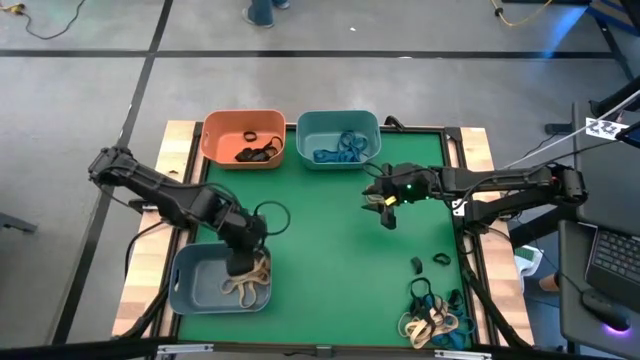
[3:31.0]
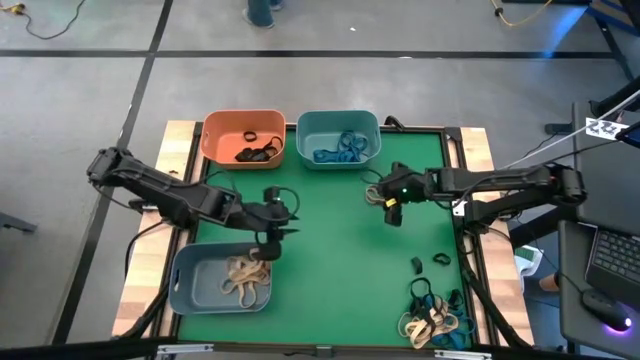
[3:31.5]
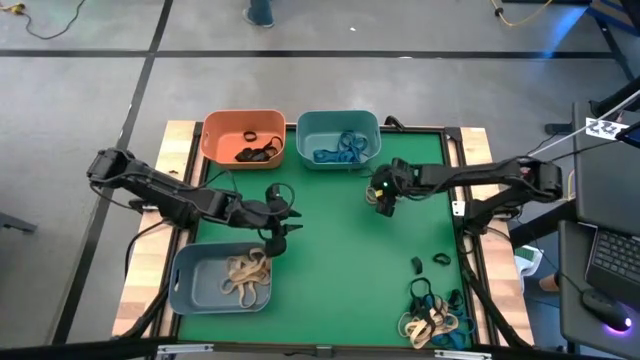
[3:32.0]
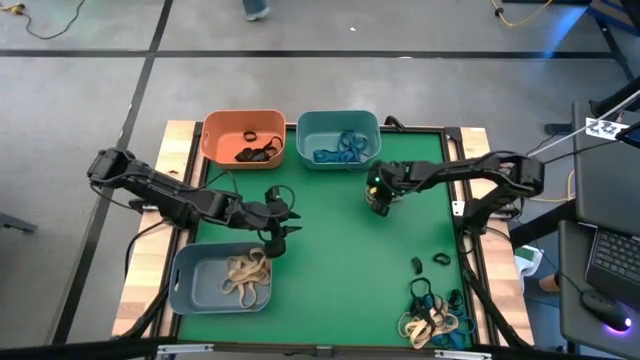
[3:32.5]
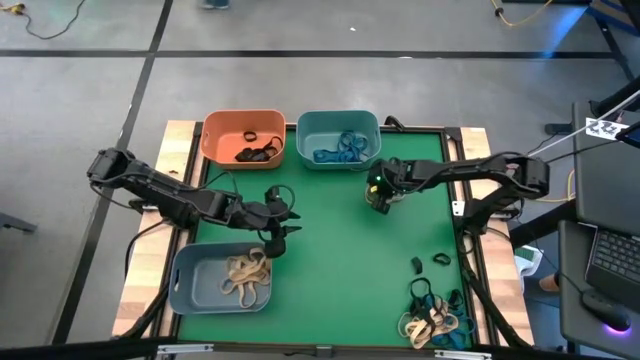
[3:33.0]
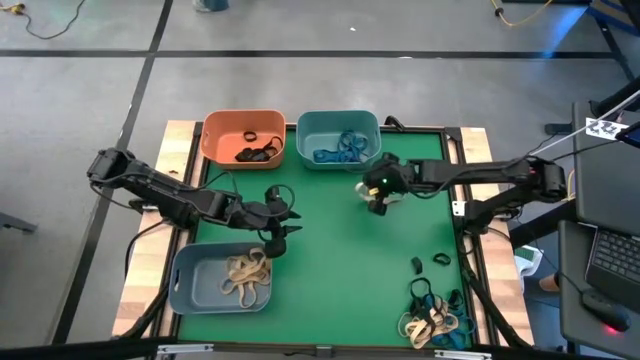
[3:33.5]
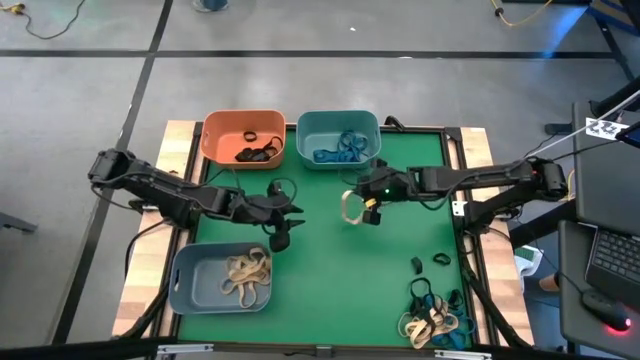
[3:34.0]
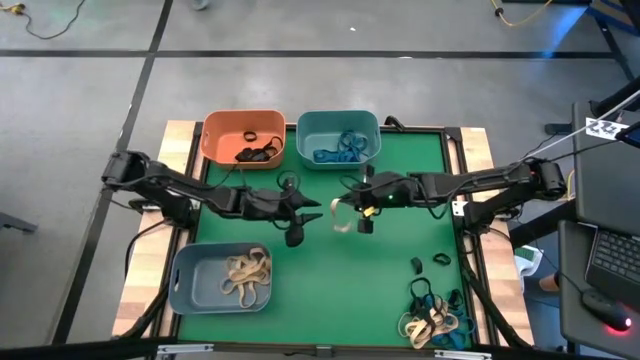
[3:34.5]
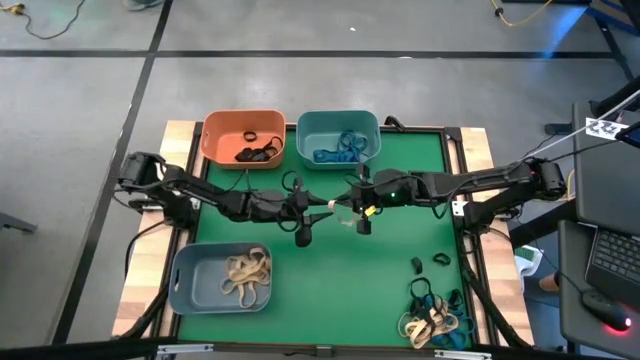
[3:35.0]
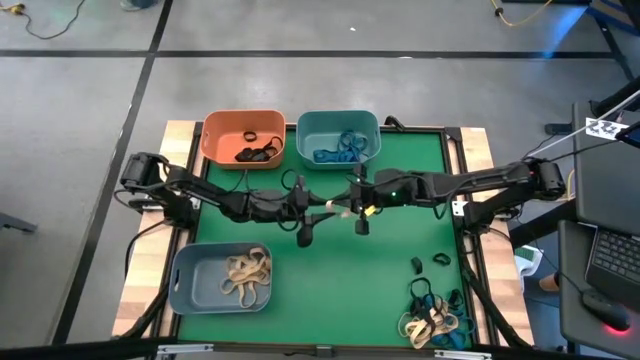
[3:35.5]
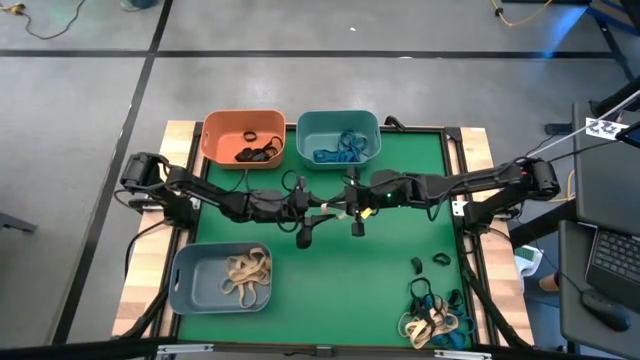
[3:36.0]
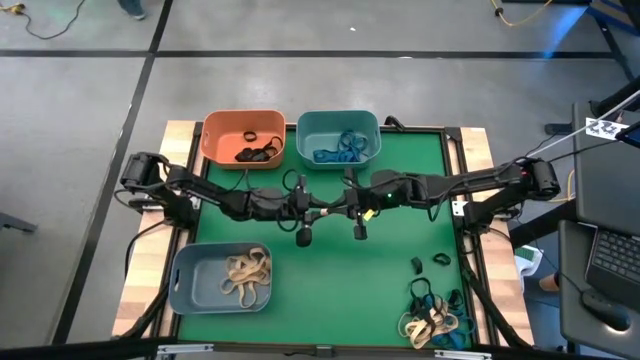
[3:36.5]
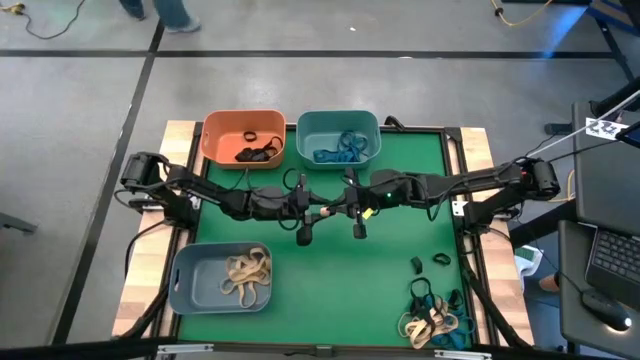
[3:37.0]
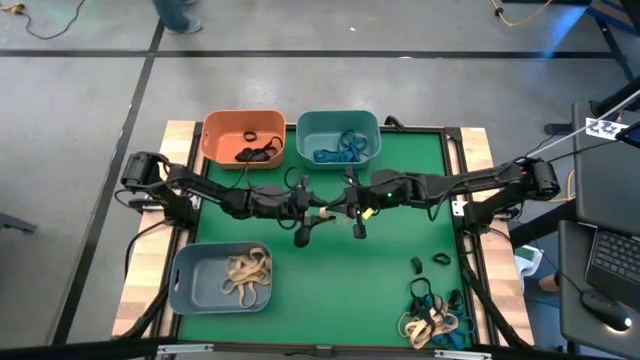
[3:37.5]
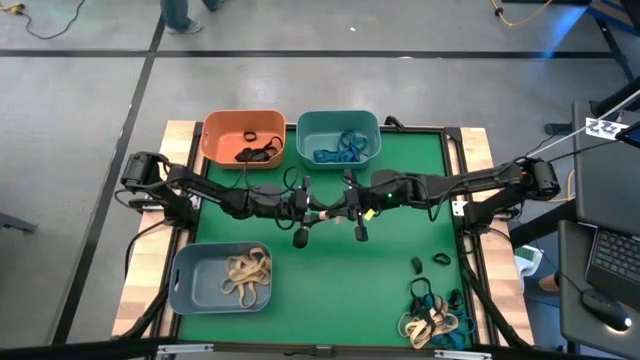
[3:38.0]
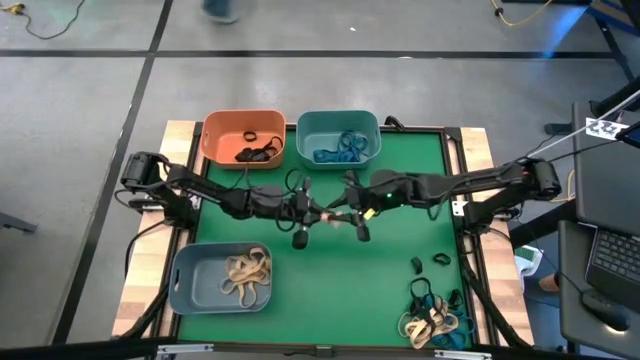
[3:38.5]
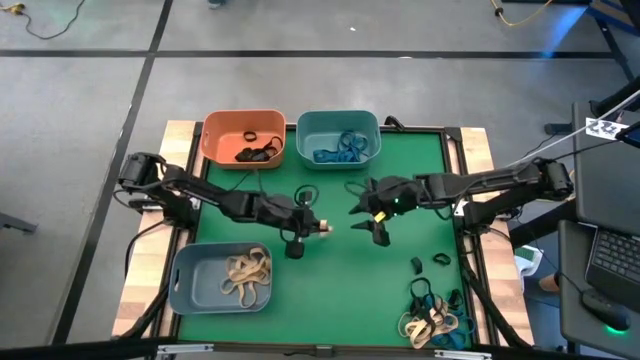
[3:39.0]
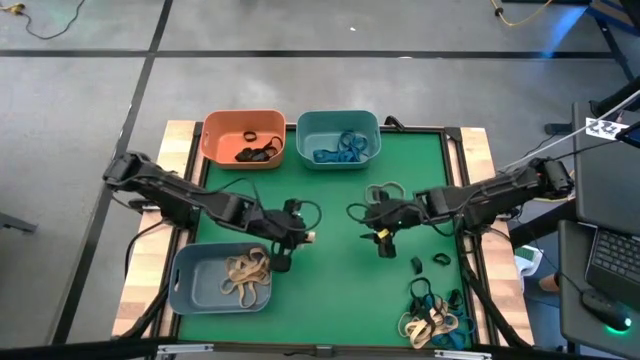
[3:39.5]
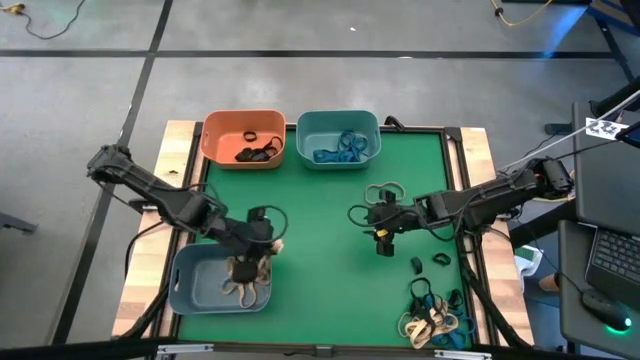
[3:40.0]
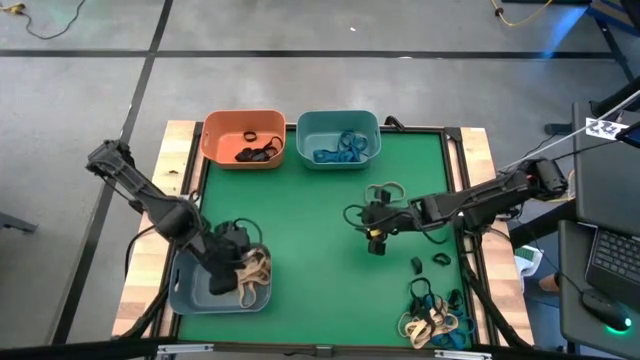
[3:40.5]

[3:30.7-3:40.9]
Task: Sort rubber bands into baskets
Put the white rubber band into the blue bin

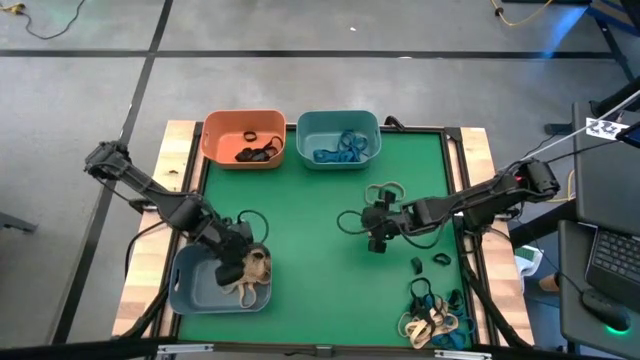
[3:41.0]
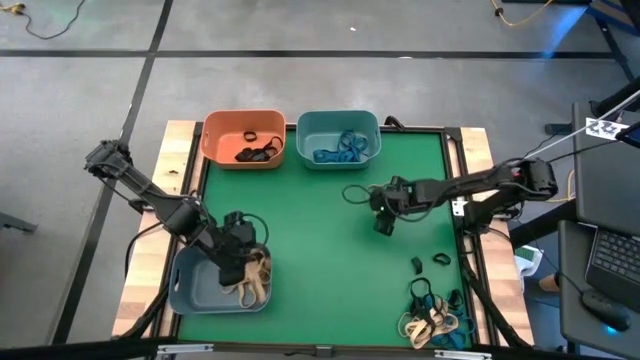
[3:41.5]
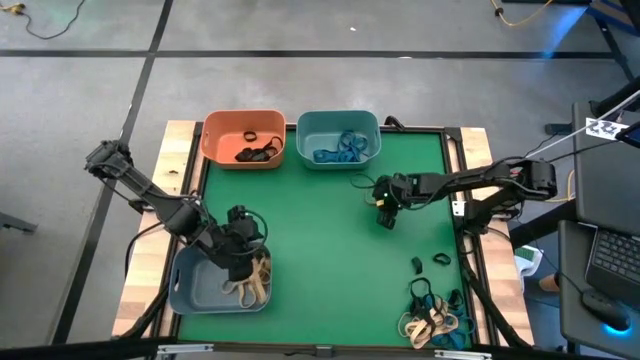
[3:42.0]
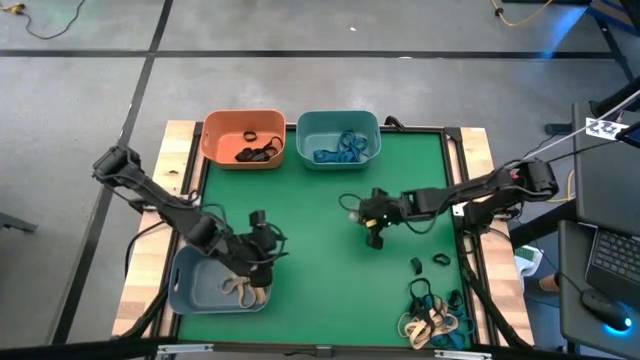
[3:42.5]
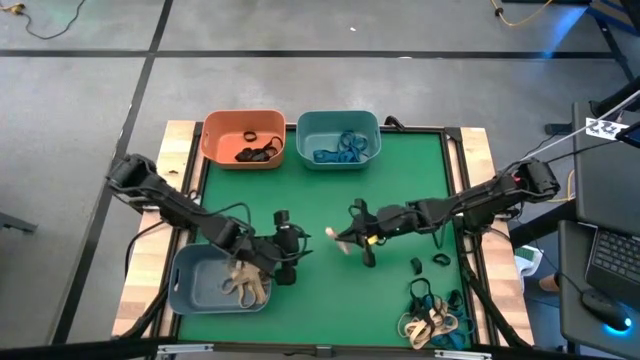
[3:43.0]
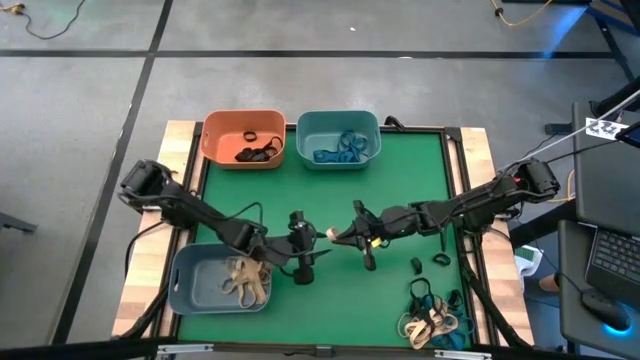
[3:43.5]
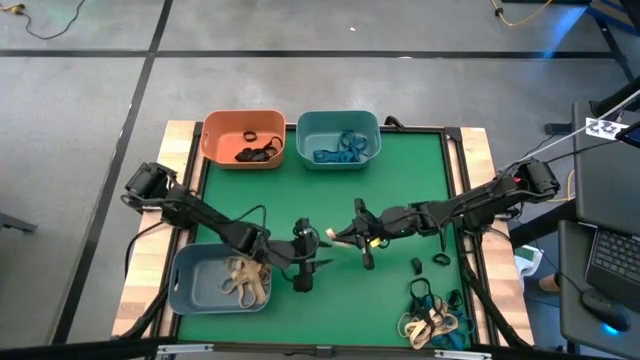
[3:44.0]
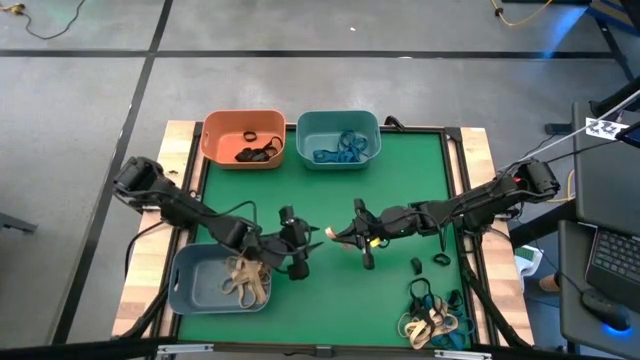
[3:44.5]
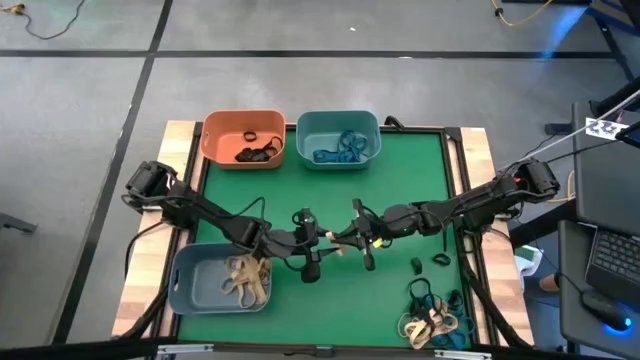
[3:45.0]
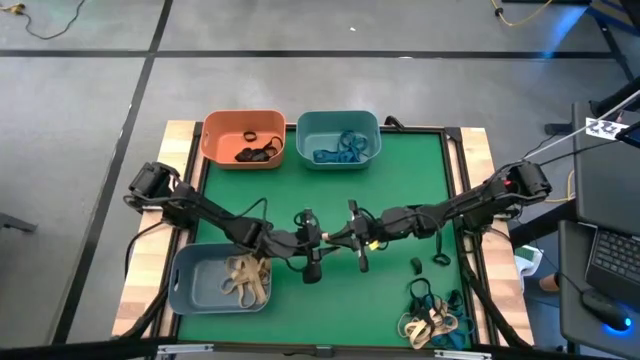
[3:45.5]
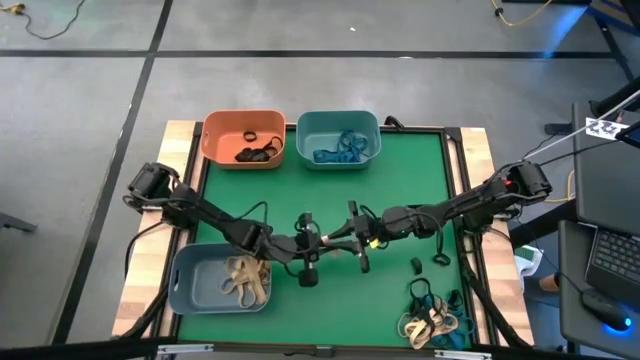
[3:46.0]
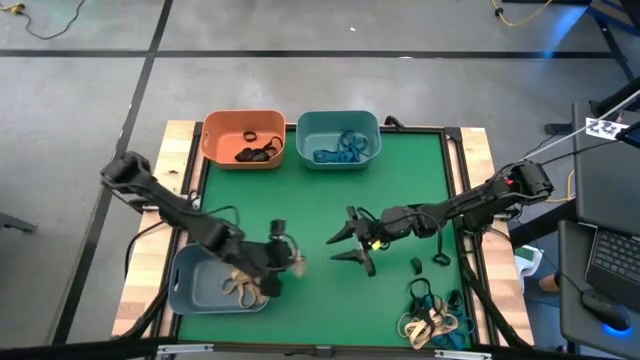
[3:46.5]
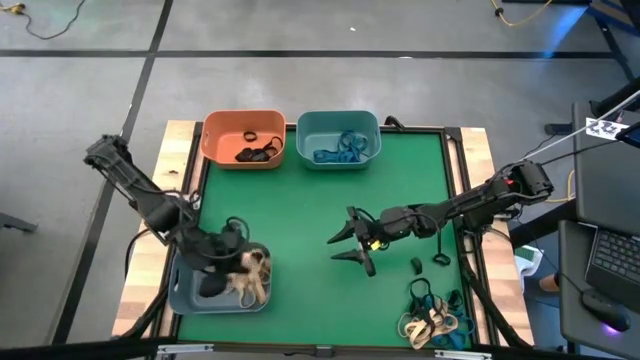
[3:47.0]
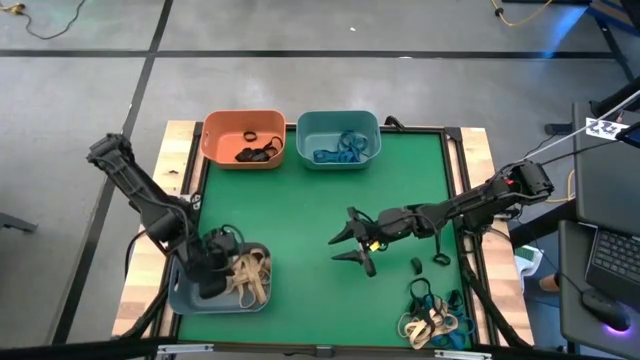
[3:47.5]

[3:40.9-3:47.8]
Put the white rubber band into the blue bin

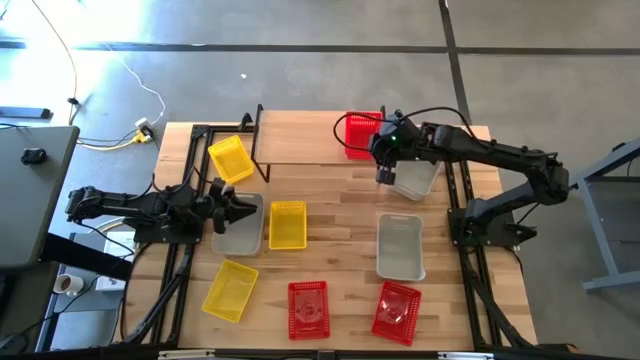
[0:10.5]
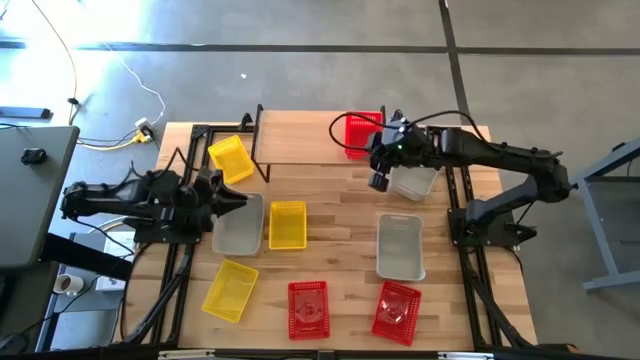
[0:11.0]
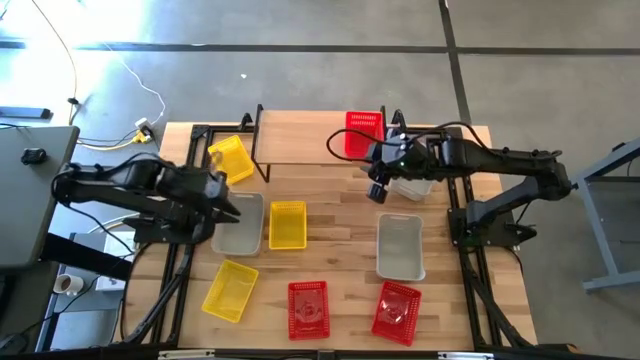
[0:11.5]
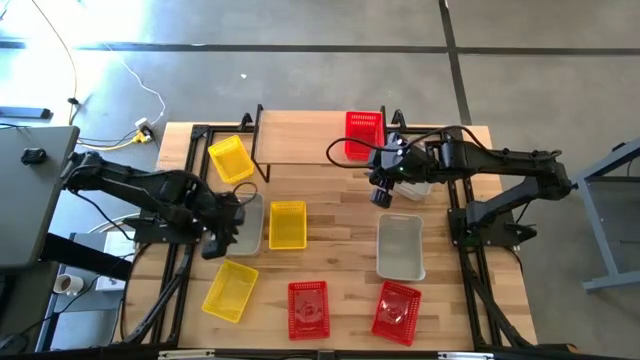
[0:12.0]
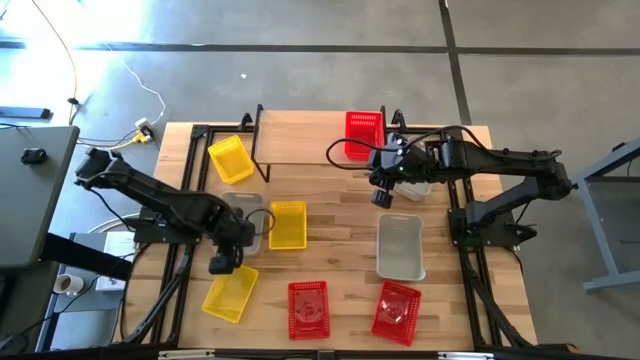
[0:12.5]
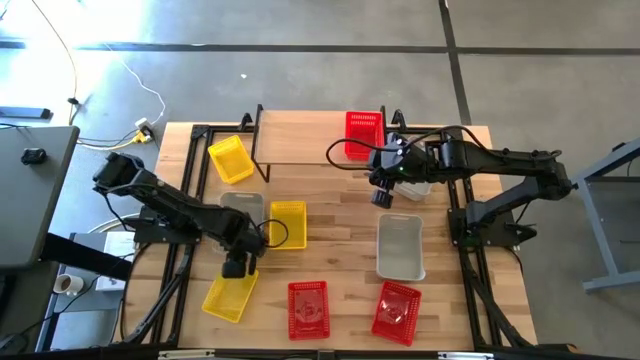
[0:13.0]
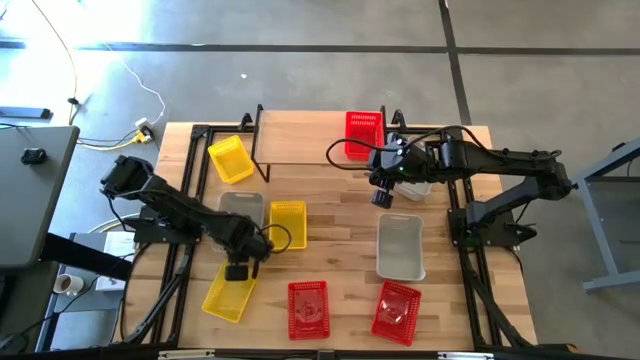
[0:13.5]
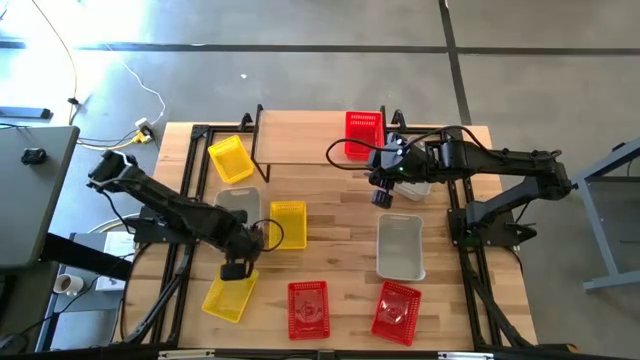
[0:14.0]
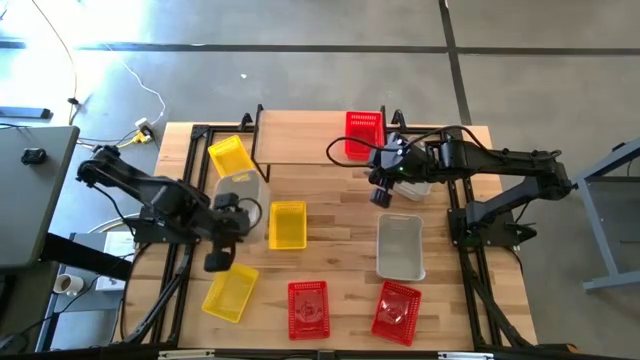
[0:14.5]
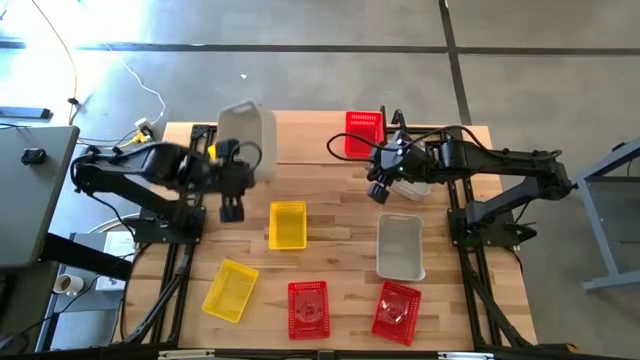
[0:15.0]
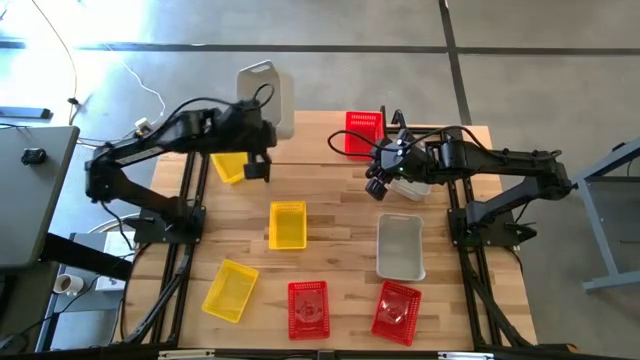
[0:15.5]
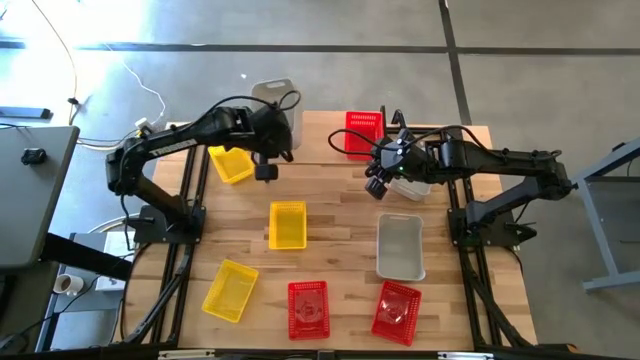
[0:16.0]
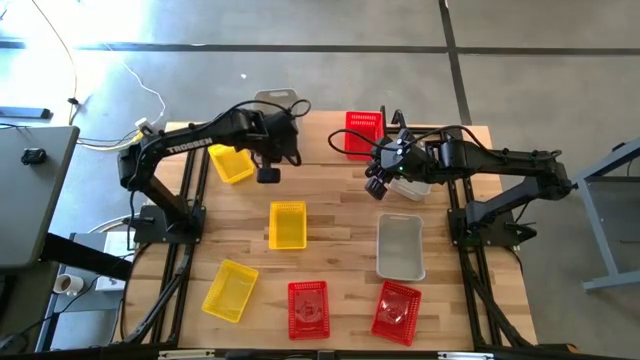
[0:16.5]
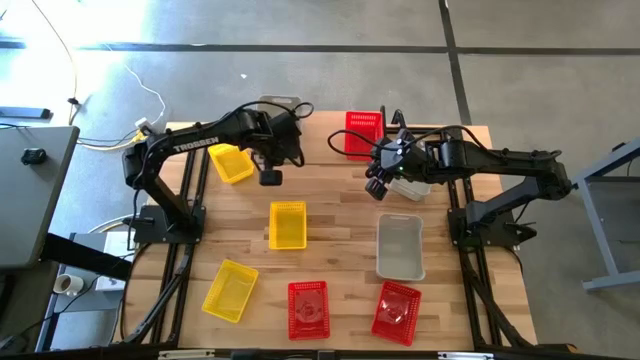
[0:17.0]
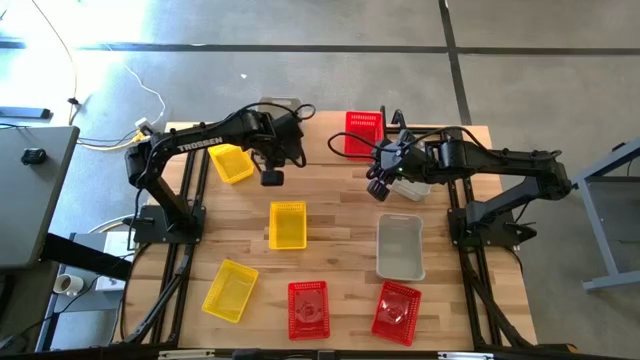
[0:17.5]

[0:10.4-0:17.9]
Task: Stack baskets on shelf by color
Put the bottom left gray bin on the shelf
